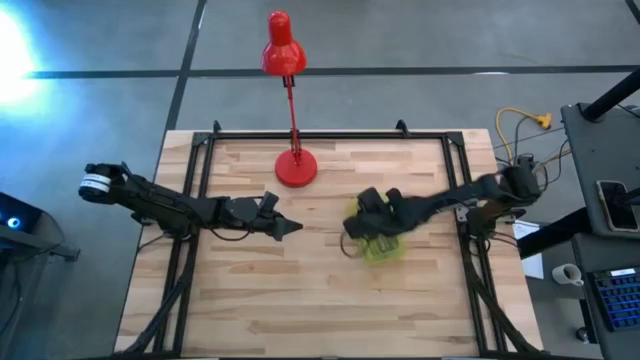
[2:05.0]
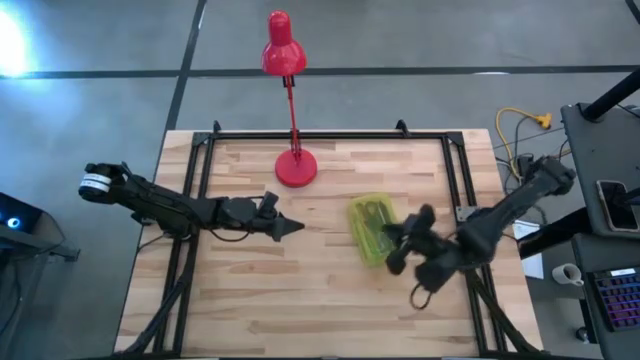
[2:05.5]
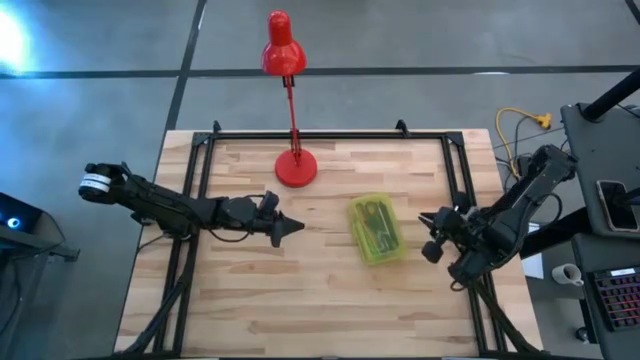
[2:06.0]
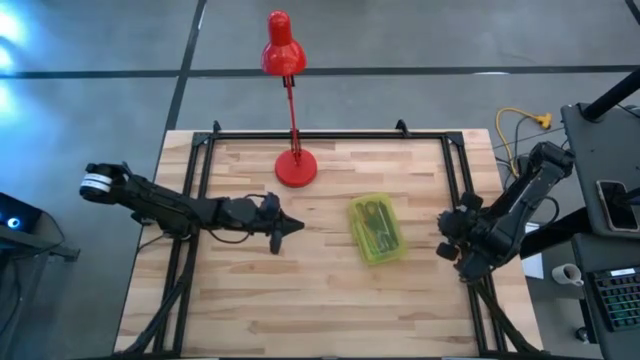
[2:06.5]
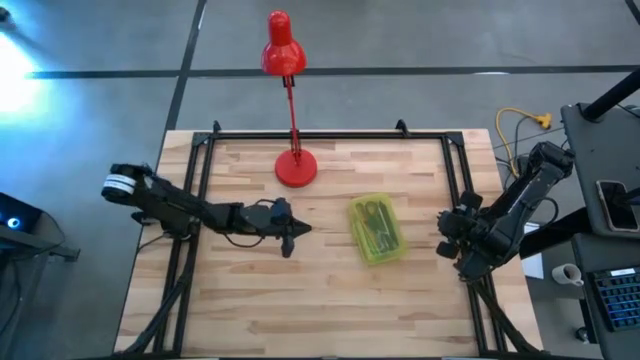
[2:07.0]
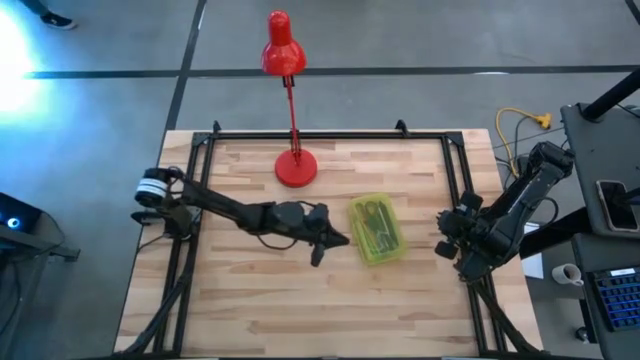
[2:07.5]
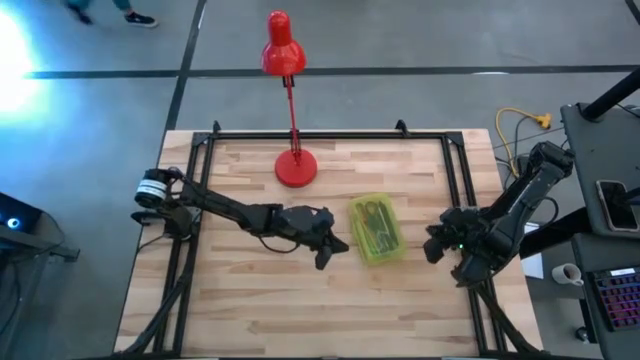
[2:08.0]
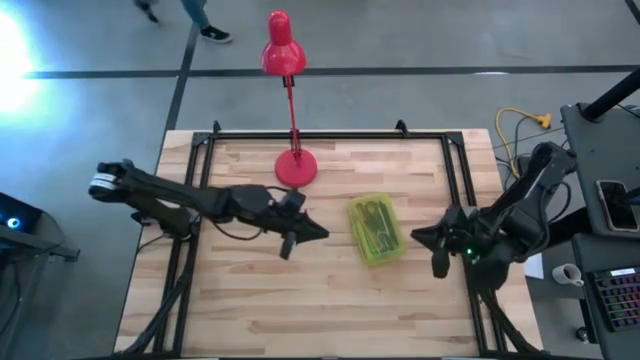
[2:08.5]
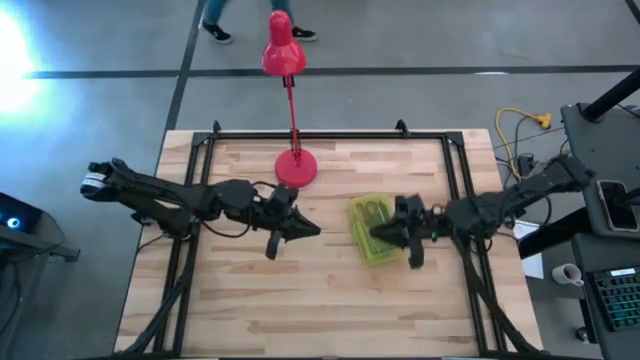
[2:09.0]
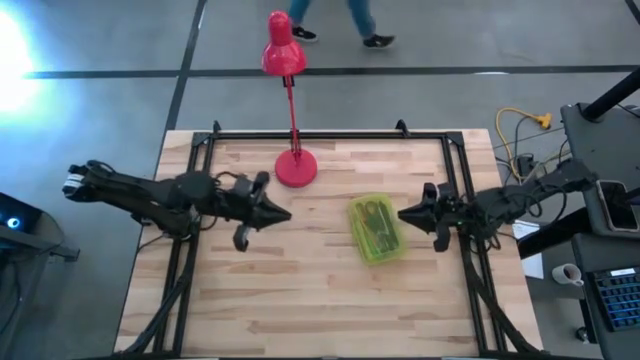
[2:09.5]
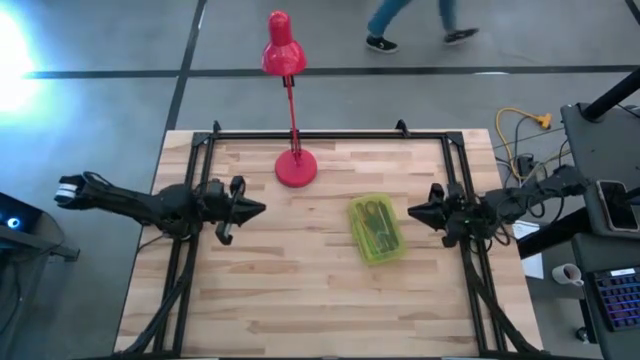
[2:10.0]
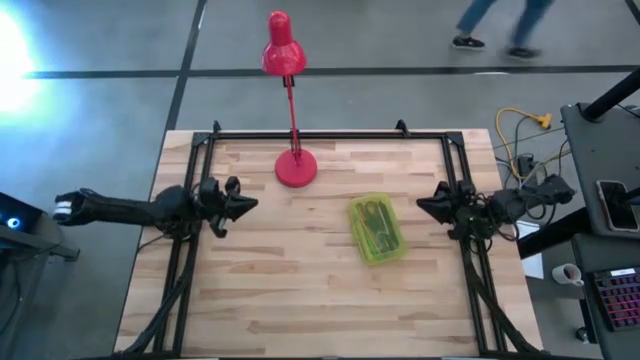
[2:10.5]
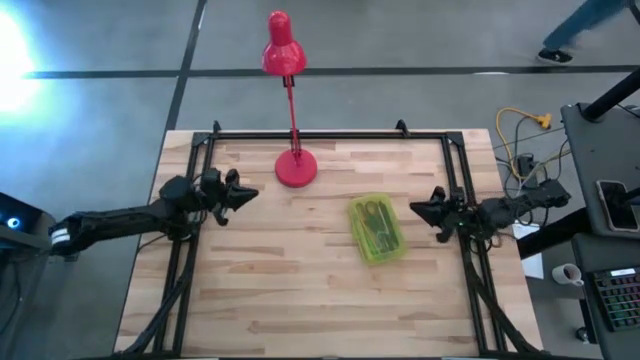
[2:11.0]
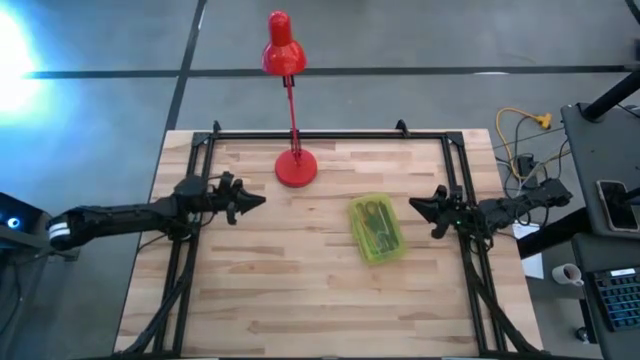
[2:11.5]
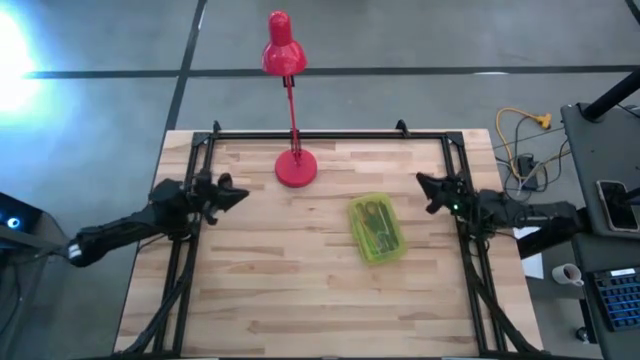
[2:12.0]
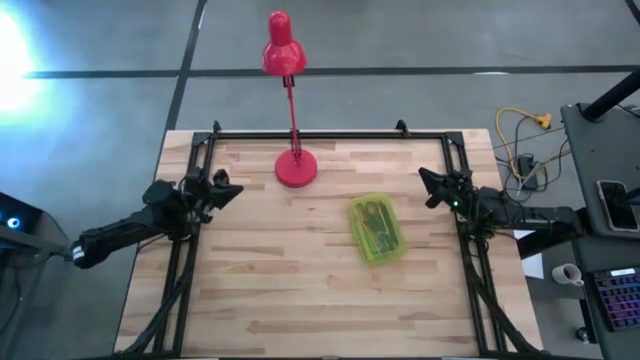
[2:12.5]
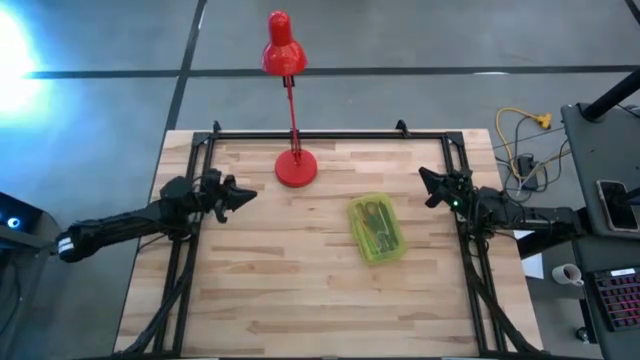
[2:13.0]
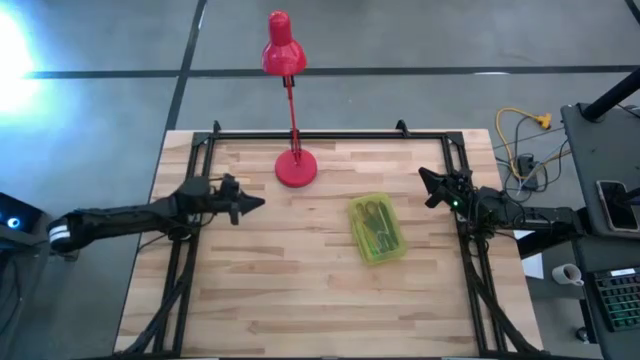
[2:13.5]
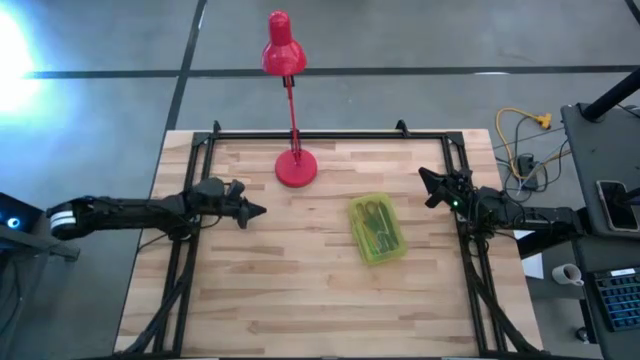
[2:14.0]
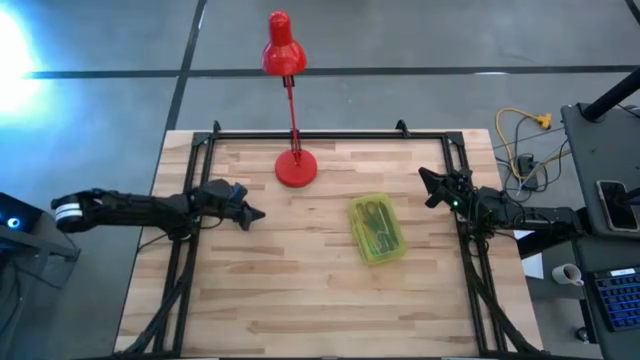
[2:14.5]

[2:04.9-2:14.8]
Task: Pick & place school supplies into a supply box
Return to Home Position

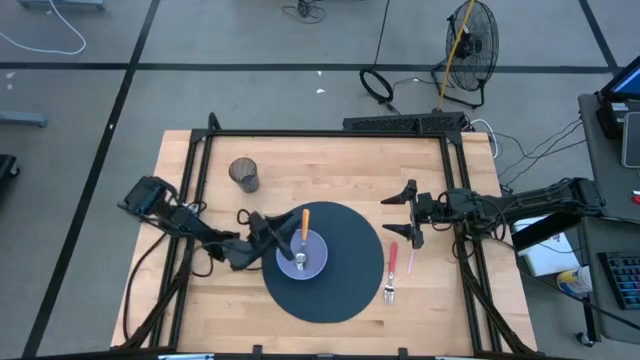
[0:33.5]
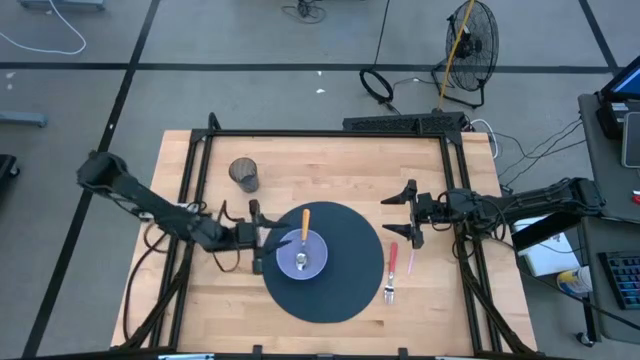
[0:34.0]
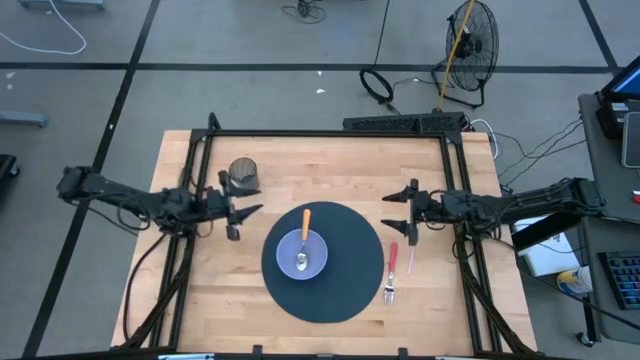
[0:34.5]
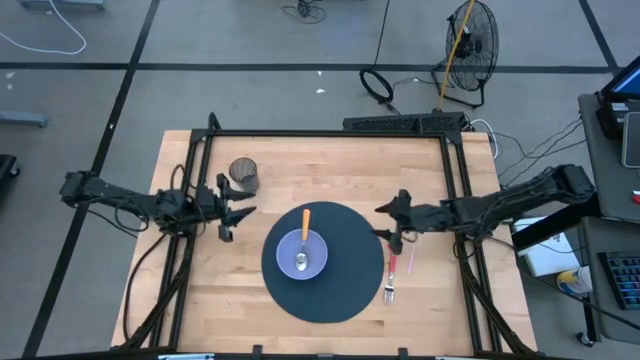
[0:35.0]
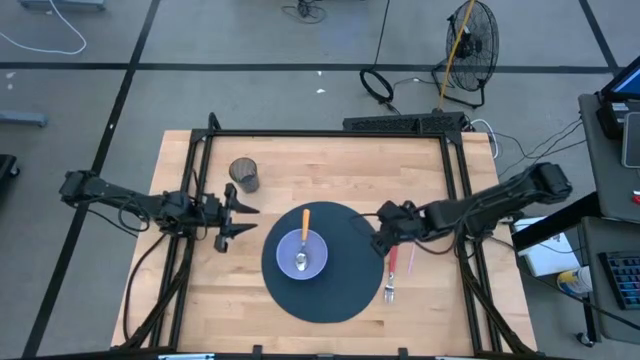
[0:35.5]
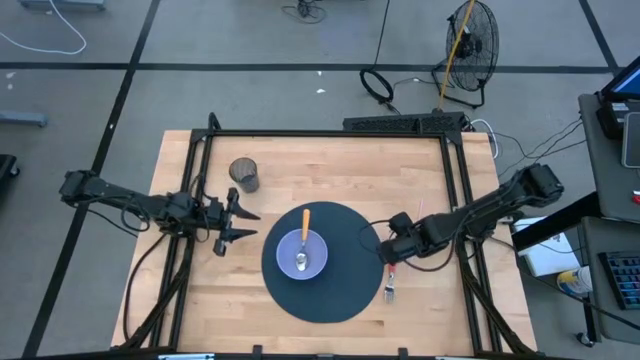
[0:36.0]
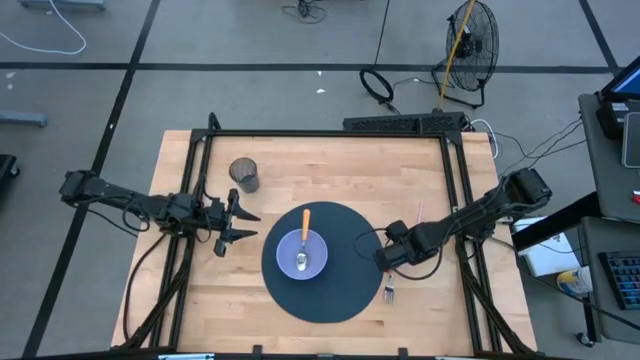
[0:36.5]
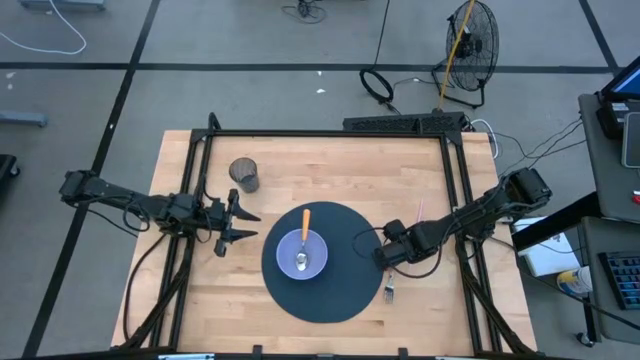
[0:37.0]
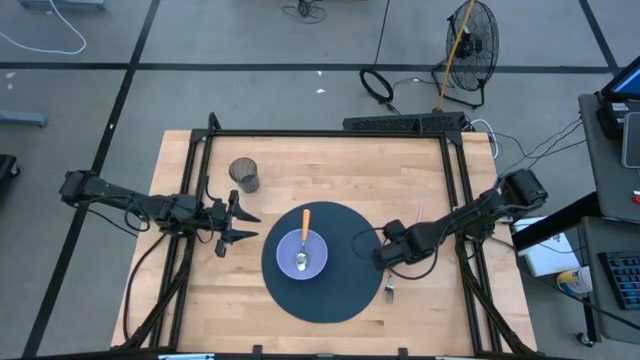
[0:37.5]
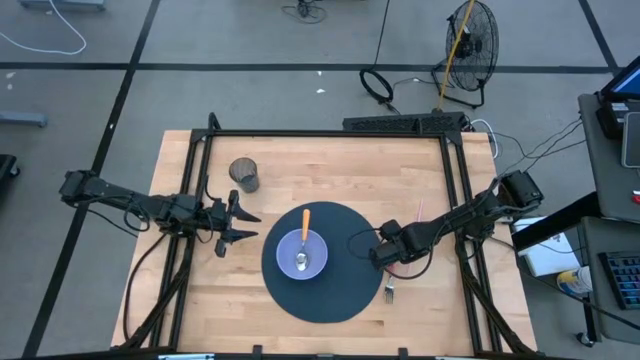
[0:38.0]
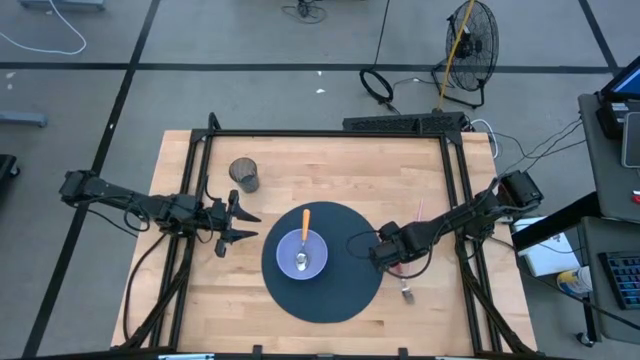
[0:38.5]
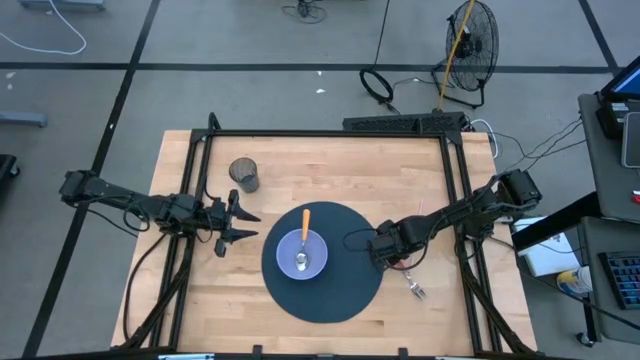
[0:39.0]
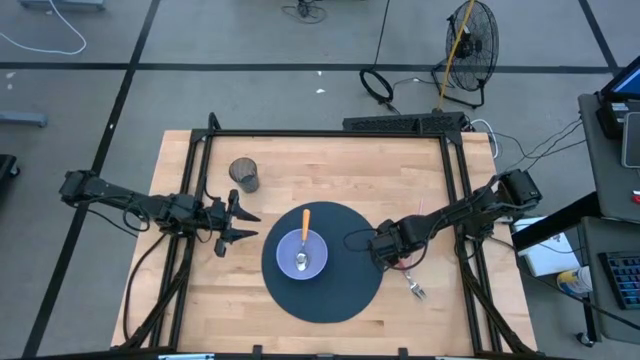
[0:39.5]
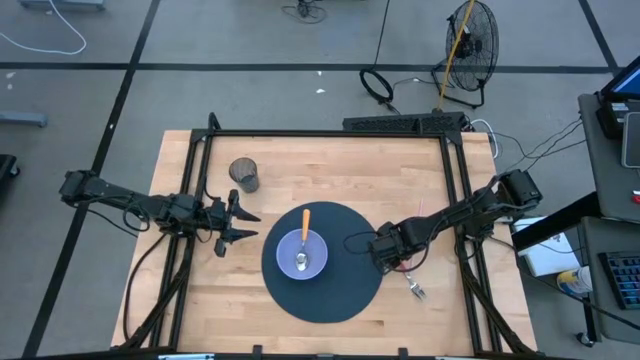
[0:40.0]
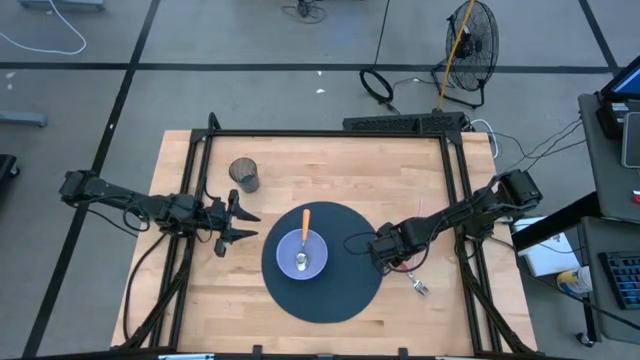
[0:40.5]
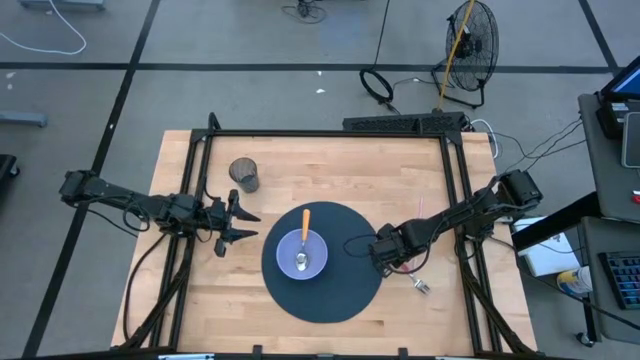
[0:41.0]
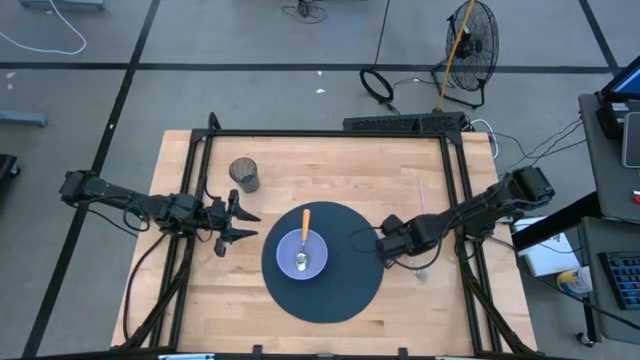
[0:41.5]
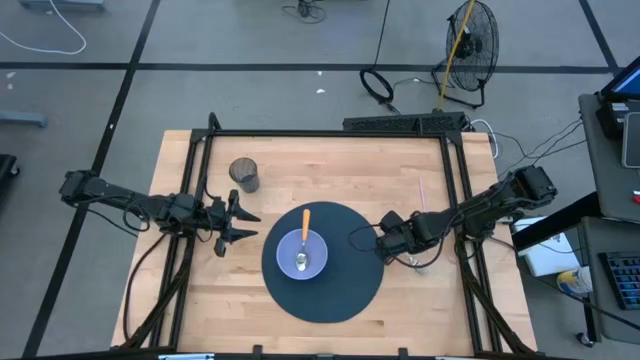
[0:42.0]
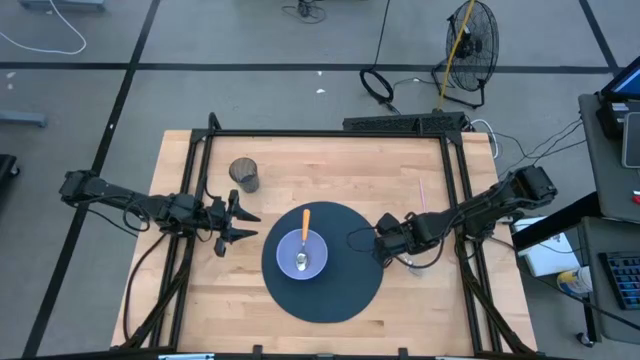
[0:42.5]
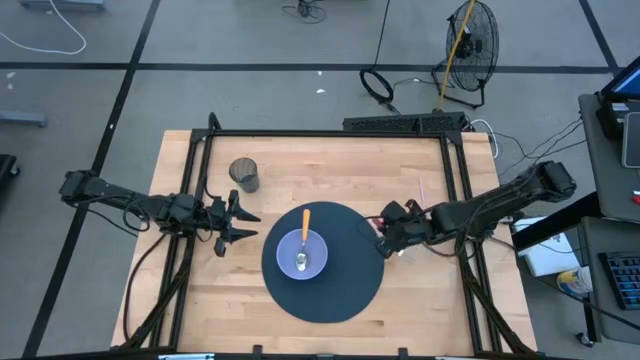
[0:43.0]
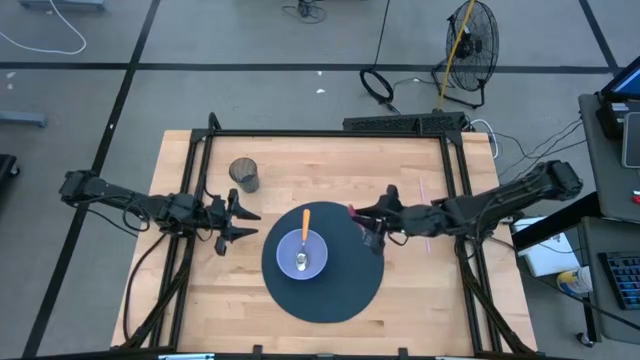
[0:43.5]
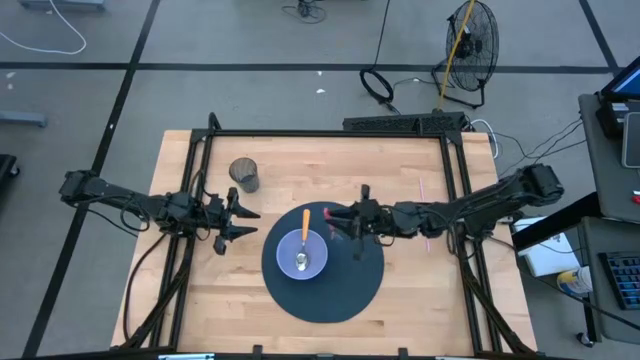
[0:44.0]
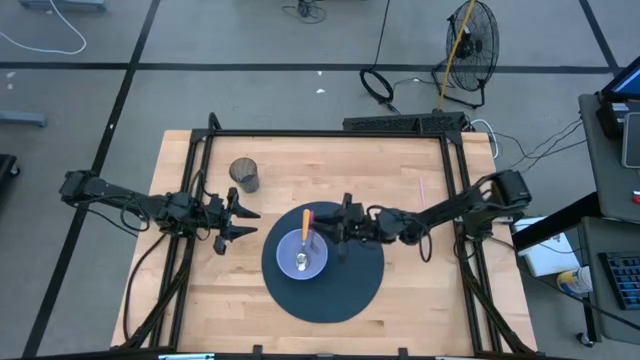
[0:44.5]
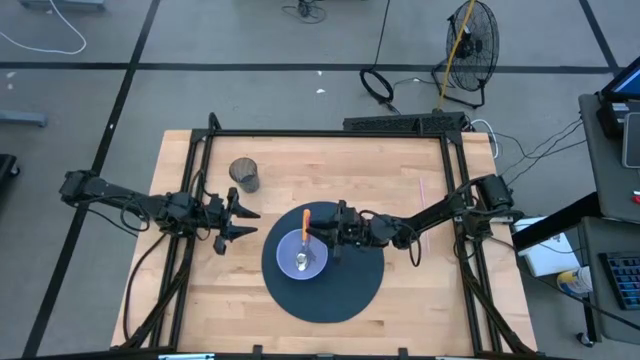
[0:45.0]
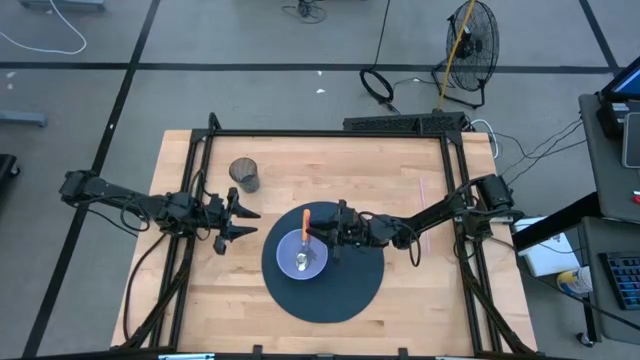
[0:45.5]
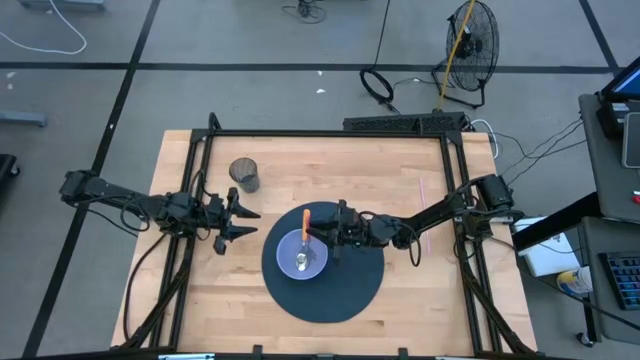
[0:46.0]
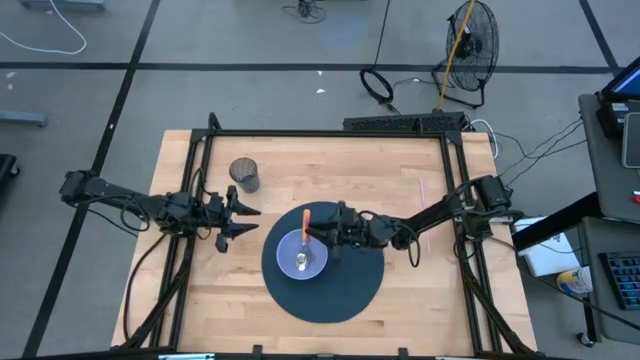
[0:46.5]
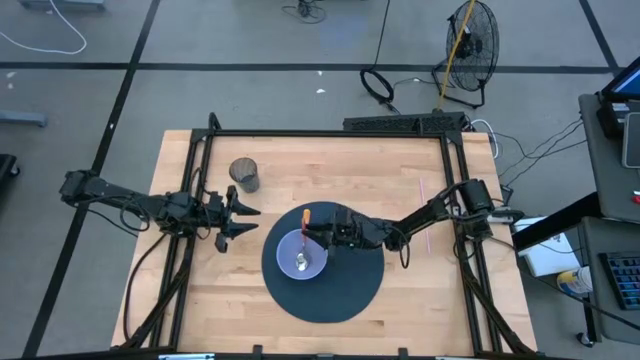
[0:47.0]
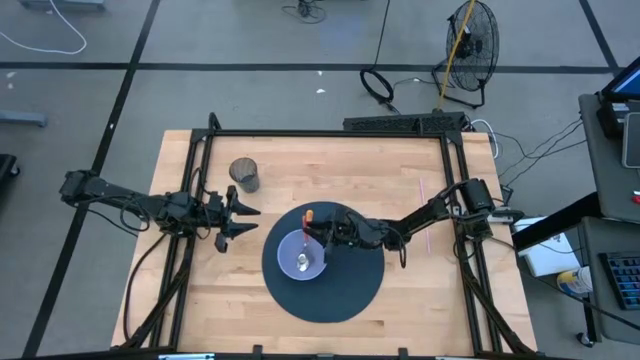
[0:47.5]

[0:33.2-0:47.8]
Task: Pick & Place Utensil
Put the pink fork into the bowl
